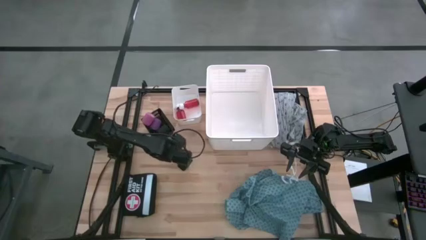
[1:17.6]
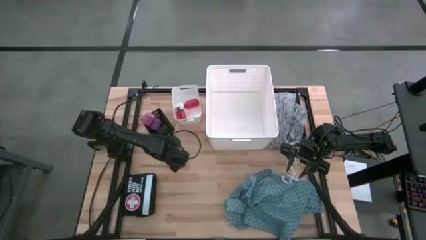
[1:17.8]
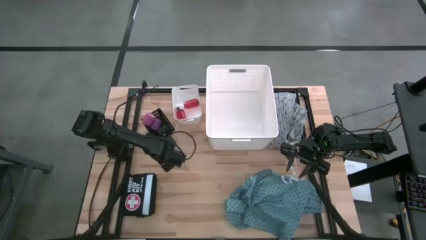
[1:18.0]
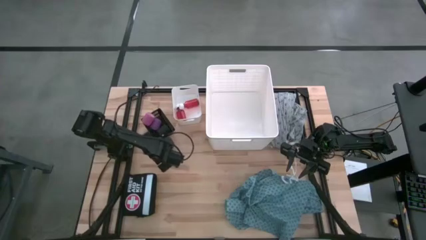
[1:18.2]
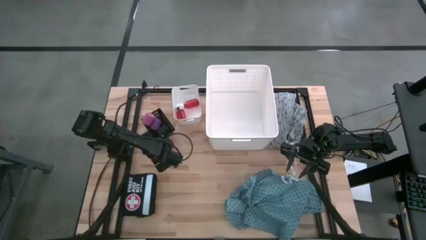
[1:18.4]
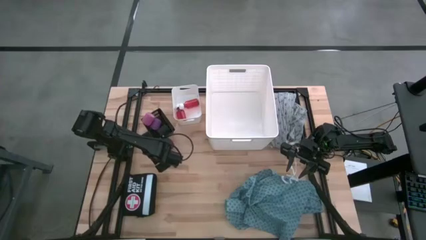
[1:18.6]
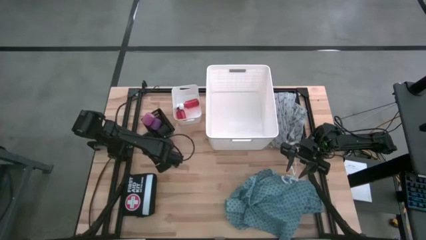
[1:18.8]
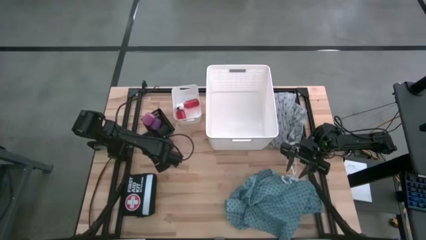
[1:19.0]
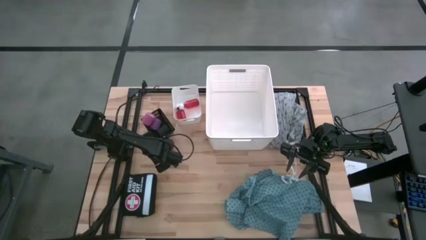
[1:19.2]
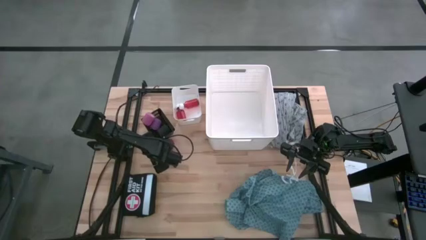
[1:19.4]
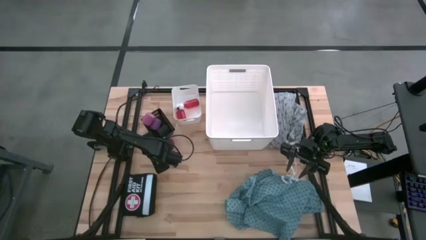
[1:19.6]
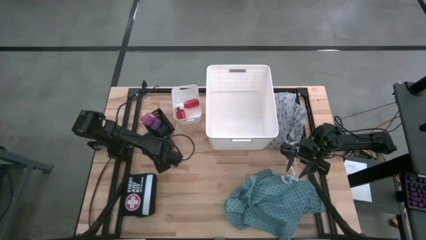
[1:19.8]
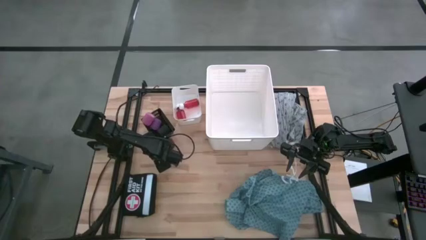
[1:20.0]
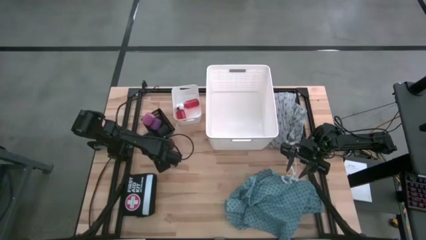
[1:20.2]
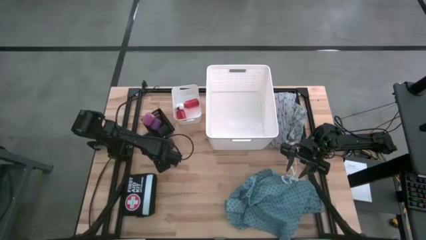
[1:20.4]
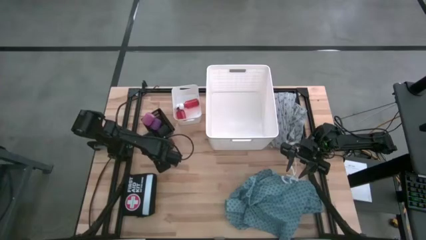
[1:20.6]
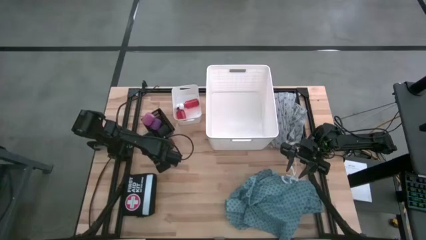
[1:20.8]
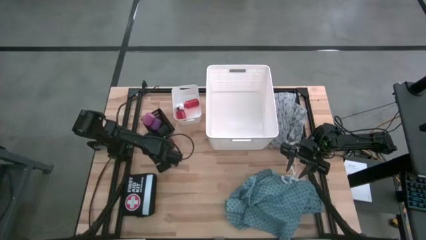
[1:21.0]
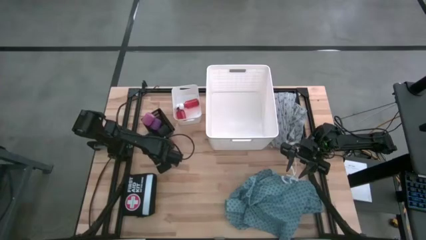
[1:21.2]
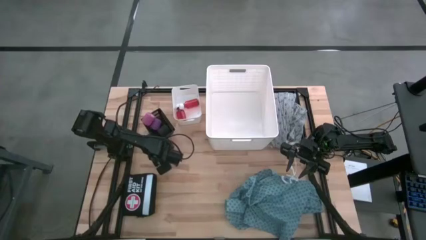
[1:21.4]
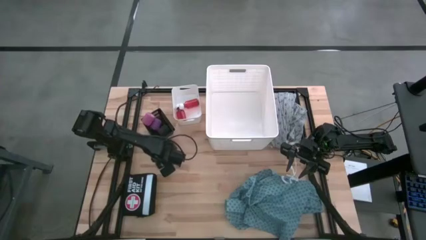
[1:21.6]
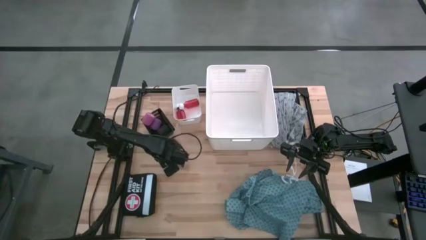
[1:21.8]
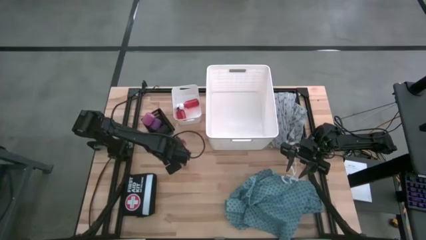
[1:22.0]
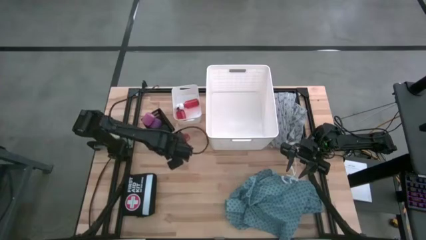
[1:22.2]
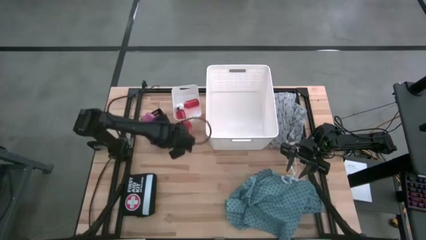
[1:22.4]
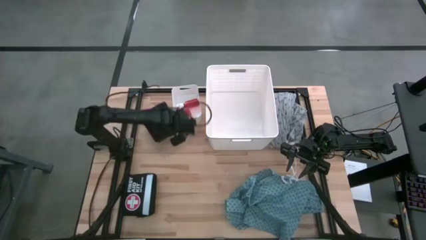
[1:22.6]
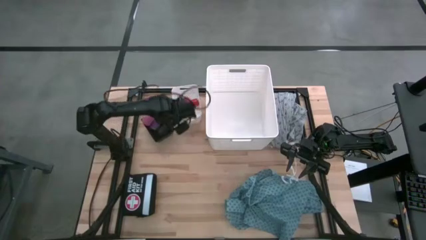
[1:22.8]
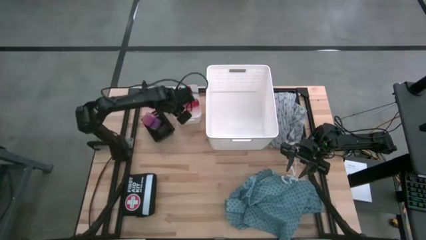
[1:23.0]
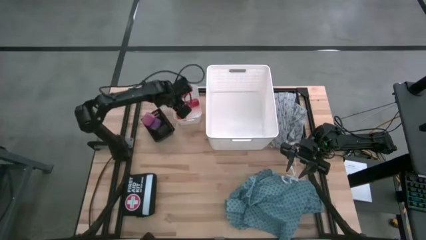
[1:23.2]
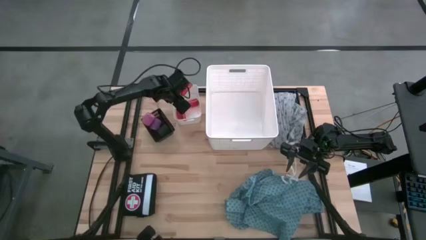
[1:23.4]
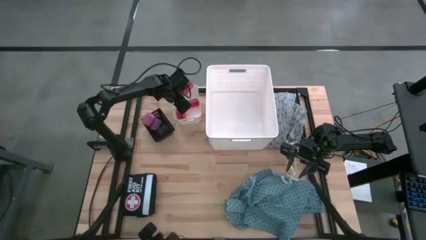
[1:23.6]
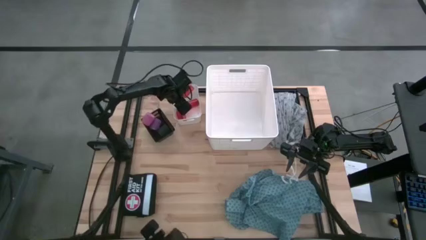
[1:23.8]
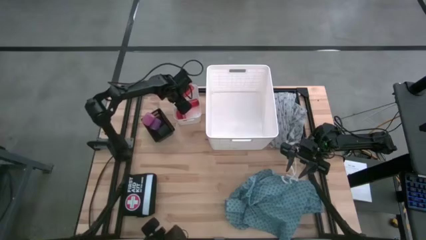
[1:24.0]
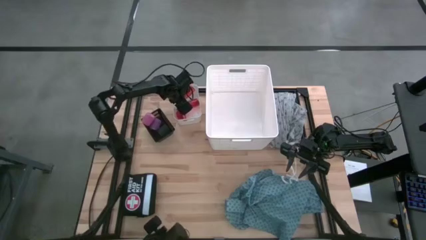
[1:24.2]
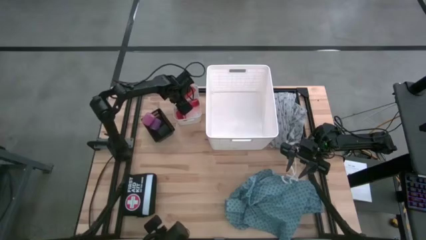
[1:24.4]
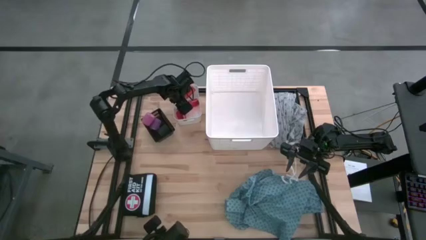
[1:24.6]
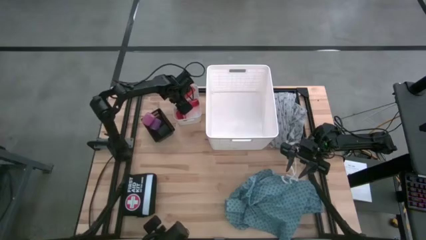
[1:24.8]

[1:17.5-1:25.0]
Task: Pick & Place Medicine items
Put the red pill bottle into the white bin

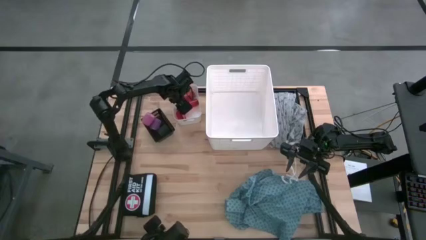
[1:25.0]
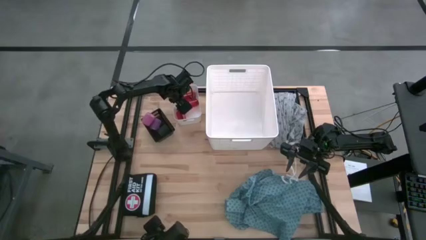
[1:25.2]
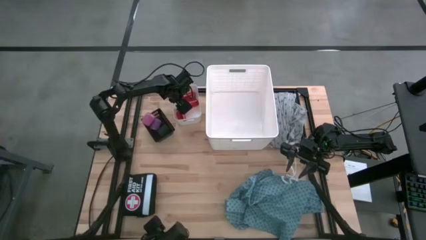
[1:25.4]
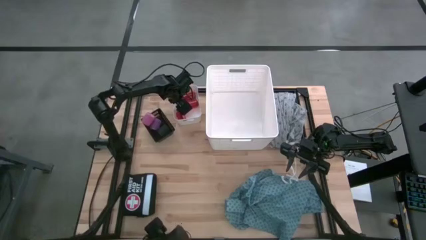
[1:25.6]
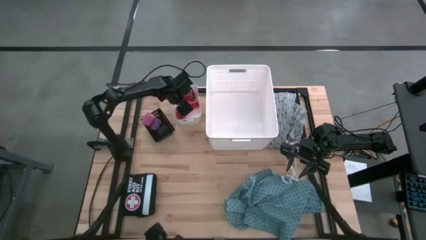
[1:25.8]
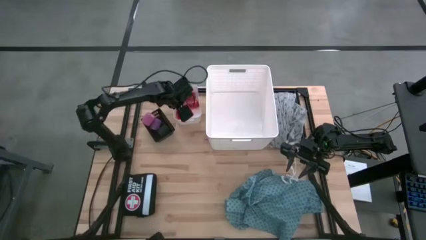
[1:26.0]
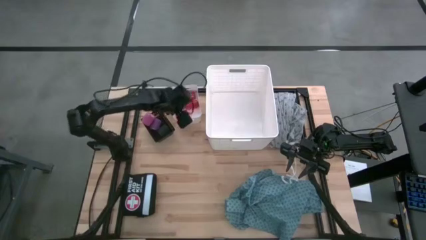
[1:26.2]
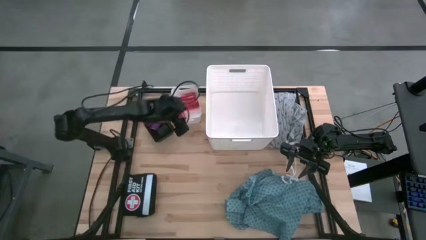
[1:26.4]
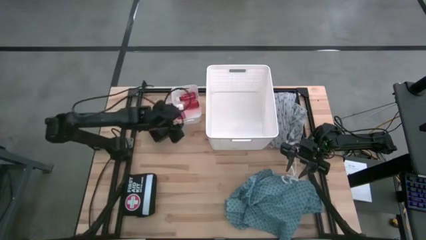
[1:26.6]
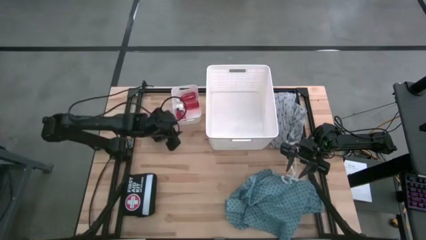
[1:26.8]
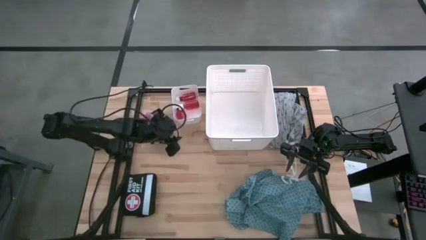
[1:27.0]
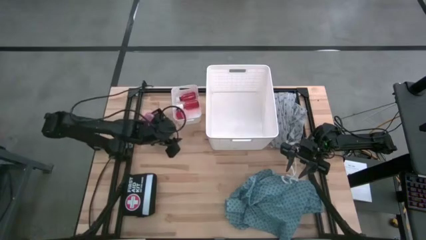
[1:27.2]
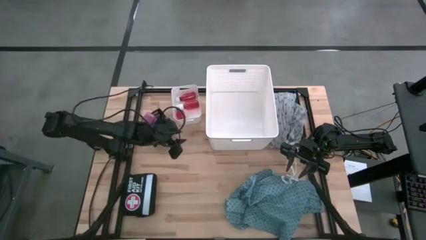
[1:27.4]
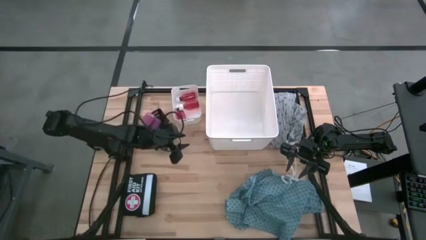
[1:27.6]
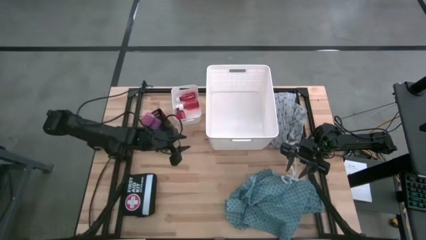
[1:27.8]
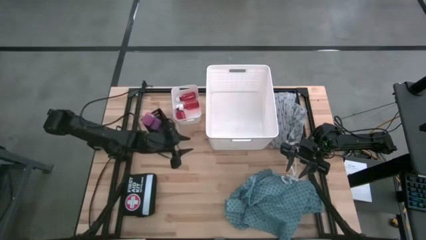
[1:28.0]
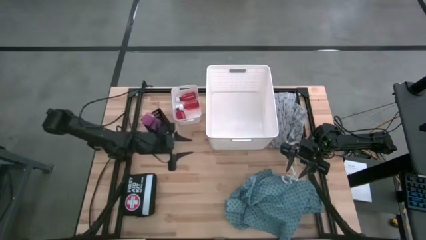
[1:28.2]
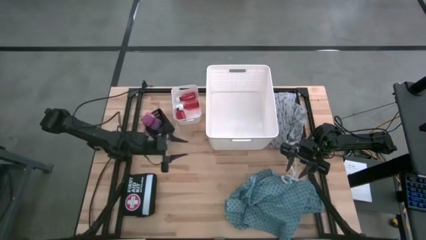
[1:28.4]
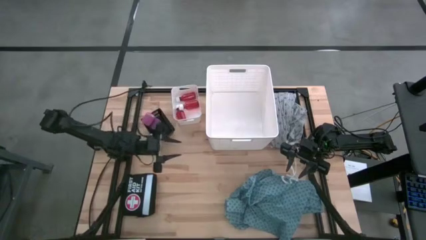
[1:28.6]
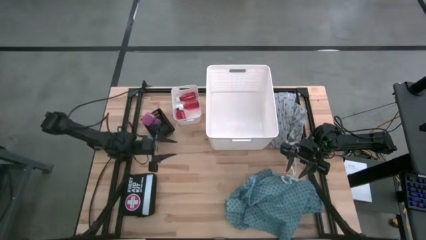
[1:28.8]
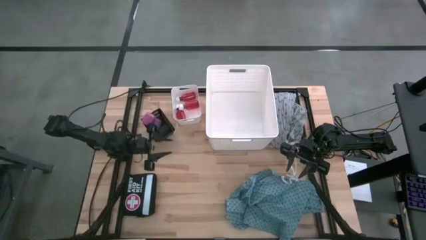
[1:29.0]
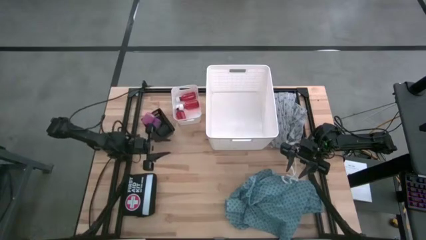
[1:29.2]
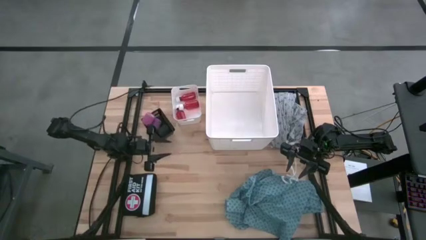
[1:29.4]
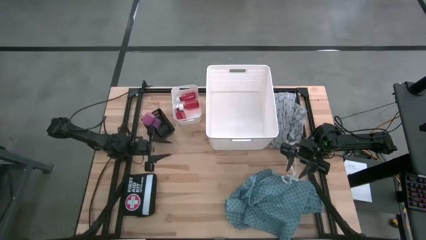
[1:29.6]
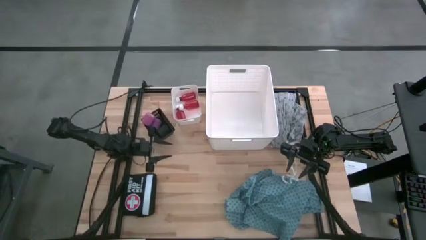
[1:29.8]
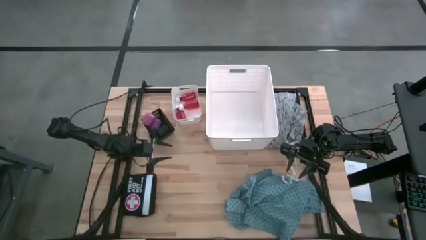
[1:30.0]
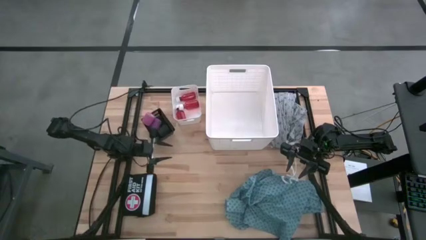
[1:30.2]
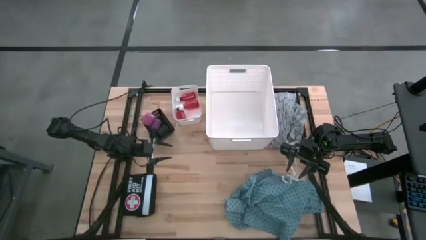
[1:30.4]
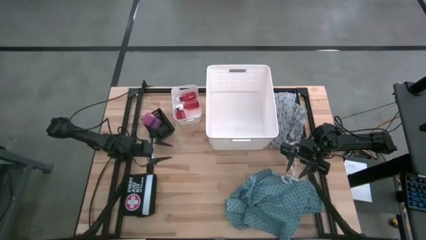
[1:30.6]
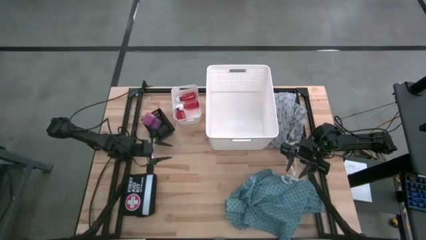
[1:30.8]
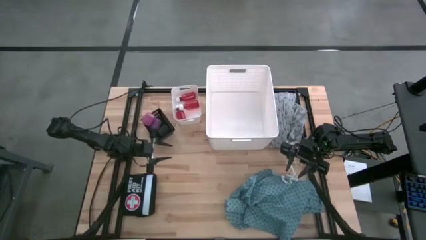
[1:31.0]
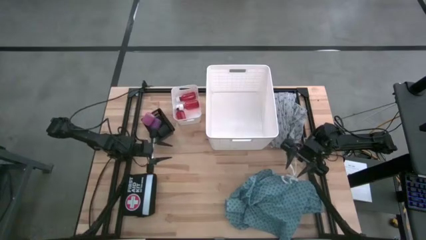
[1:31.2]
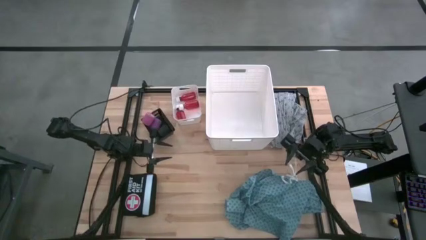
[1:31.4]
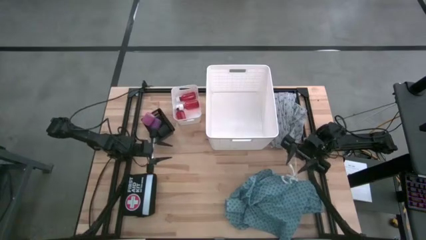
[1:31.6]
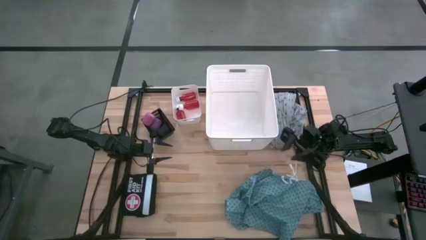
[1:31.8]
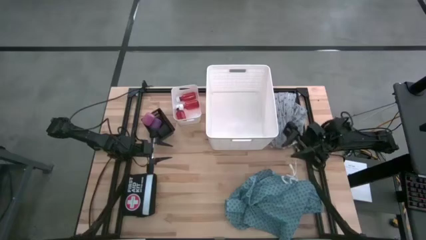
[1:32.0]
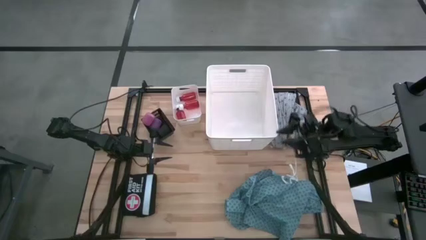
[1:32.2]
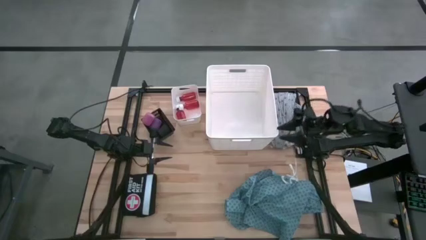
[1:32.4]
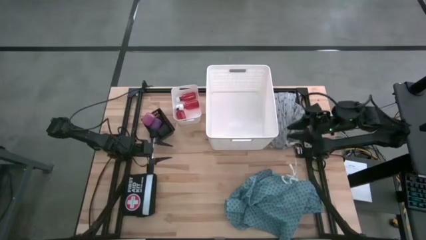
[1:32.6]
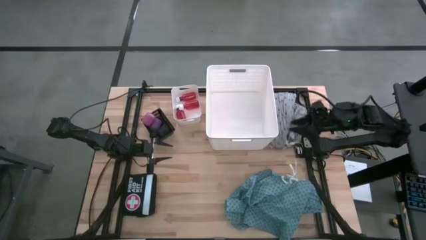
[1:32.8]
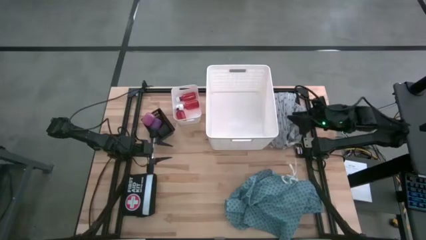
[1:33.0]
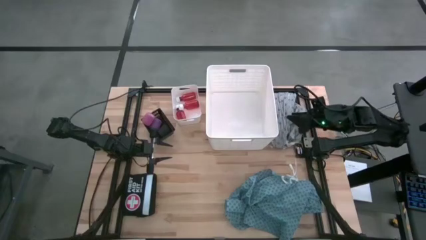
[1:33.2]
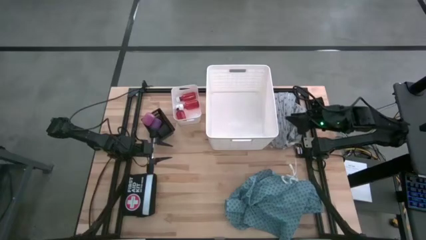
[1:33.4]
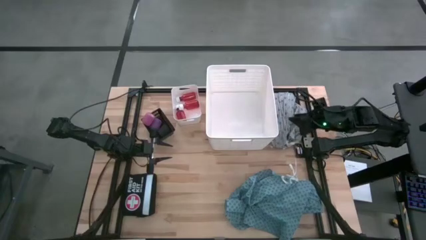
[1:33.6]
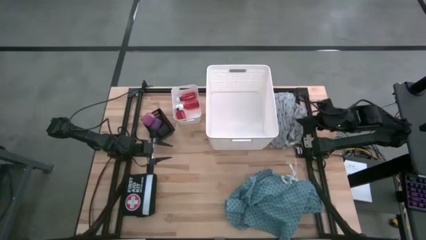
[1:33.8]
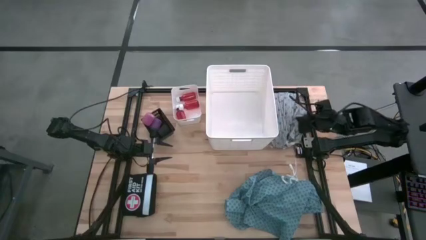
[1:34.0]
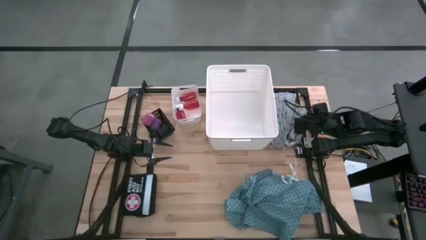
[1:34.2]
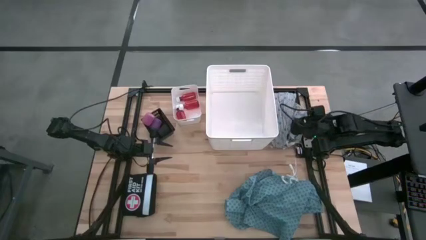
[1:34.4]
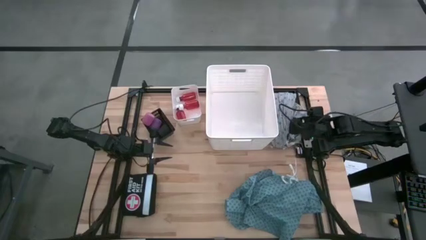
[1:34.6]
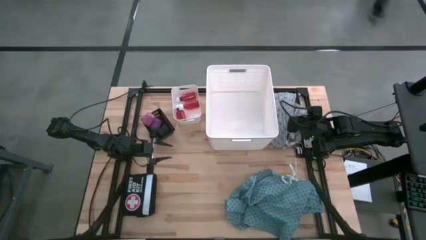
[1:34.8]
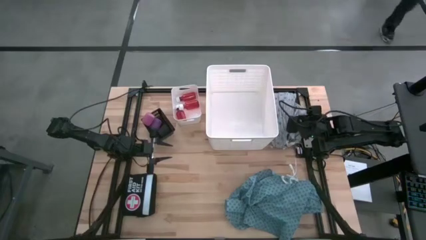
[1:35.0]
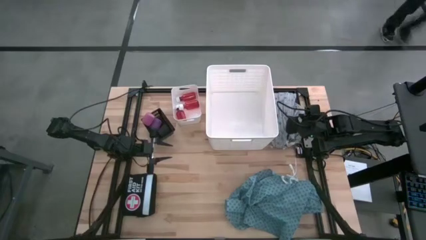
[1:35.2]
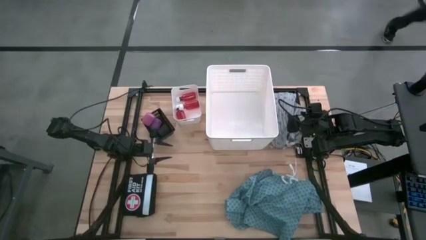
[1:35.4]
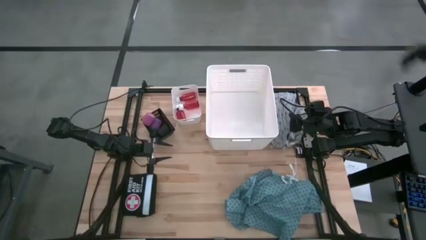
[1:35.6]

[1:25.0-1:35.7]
Put the gray patient gown into the white laundry bin
